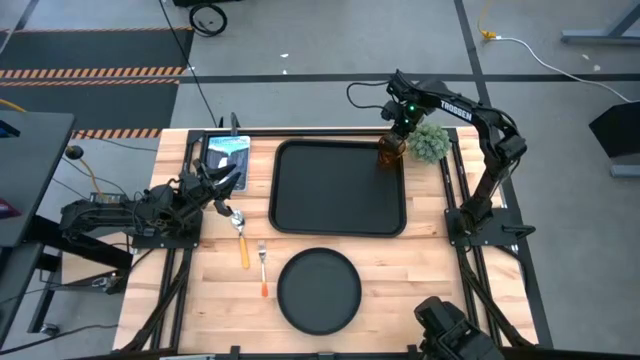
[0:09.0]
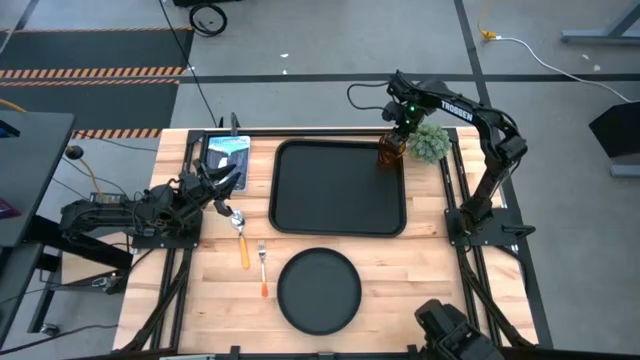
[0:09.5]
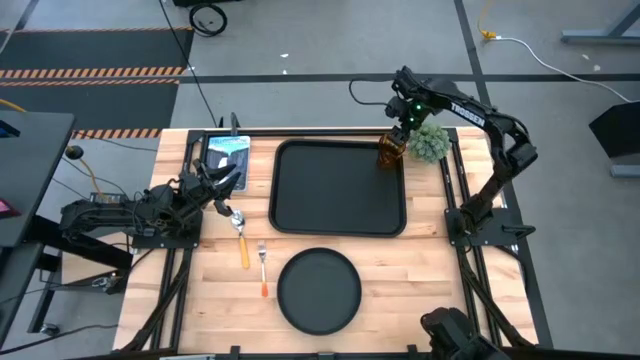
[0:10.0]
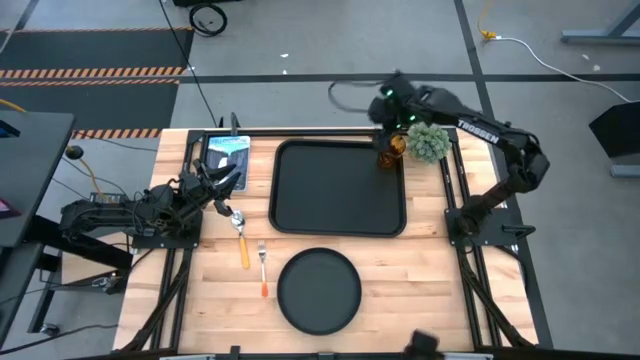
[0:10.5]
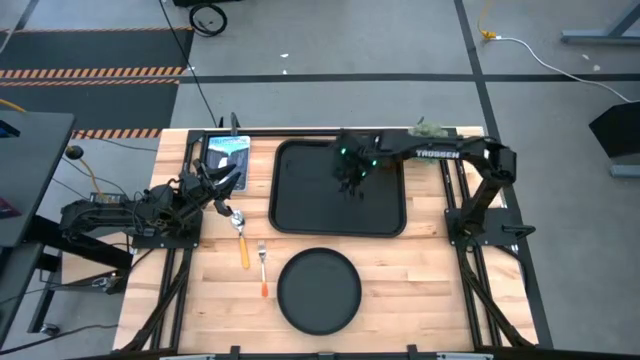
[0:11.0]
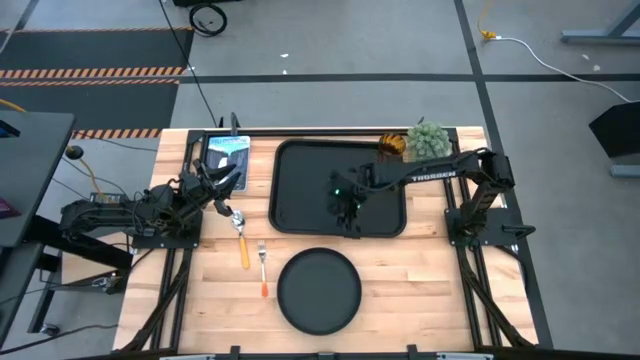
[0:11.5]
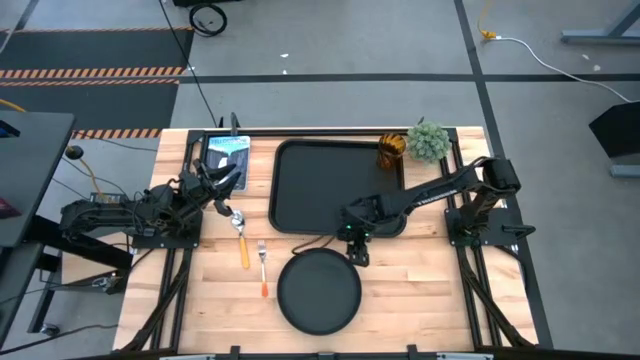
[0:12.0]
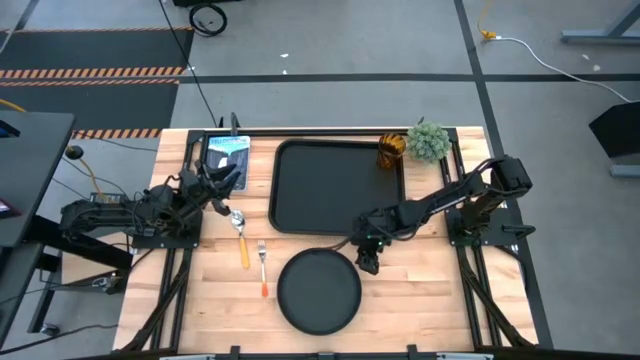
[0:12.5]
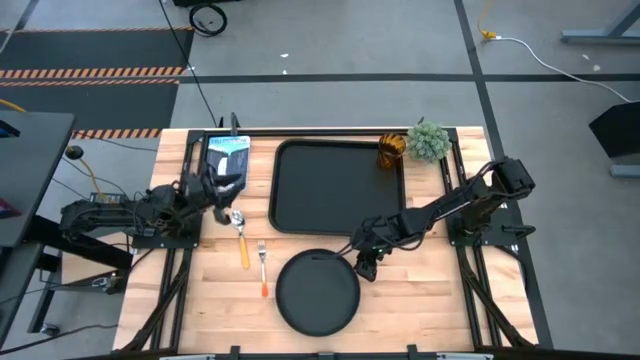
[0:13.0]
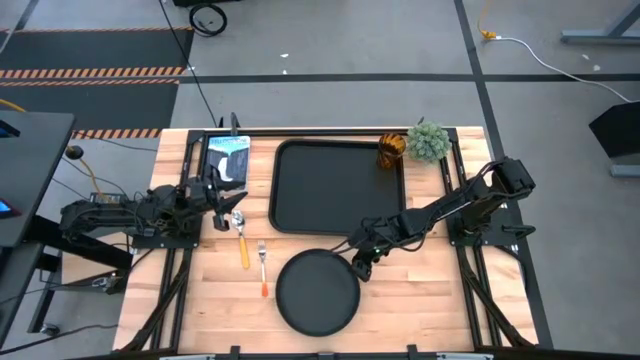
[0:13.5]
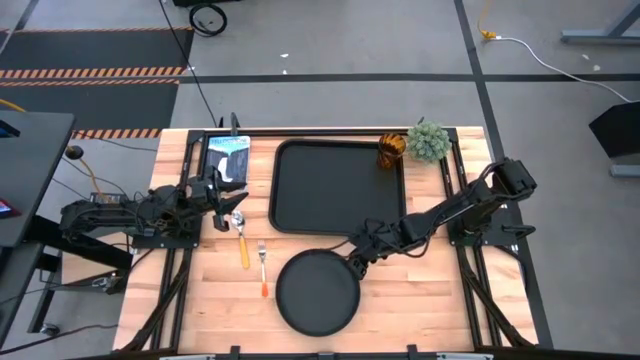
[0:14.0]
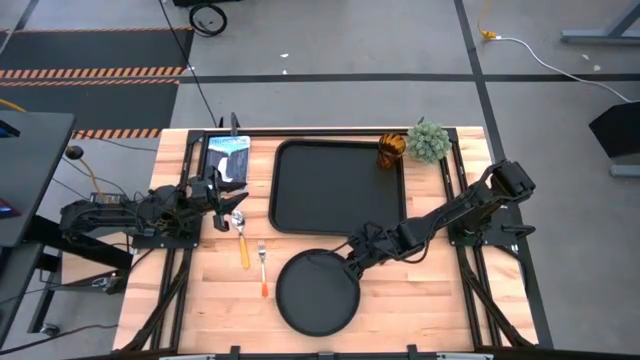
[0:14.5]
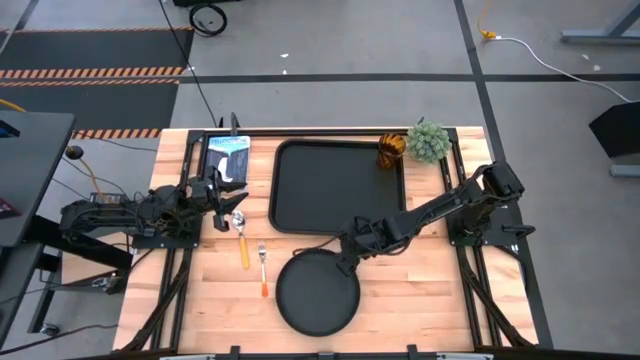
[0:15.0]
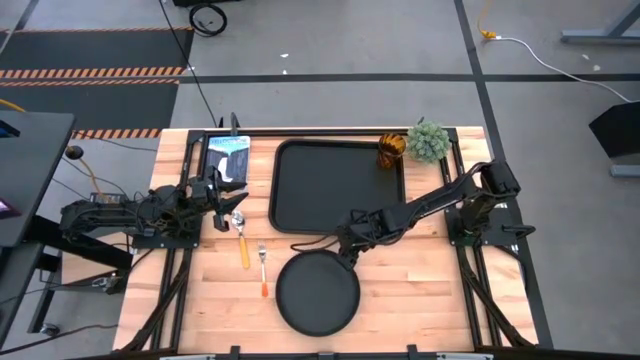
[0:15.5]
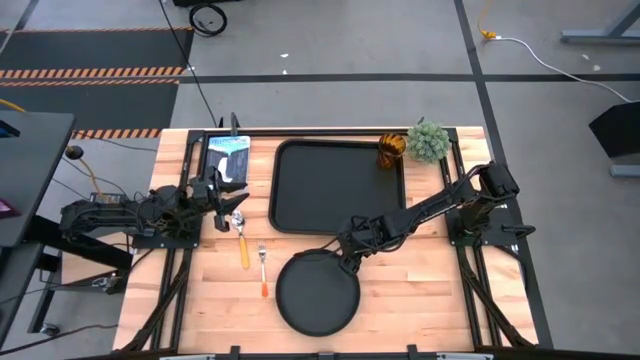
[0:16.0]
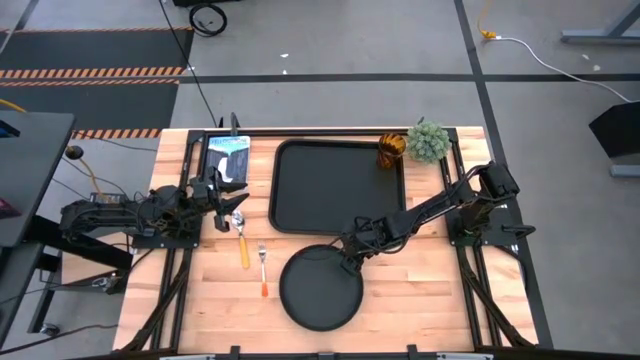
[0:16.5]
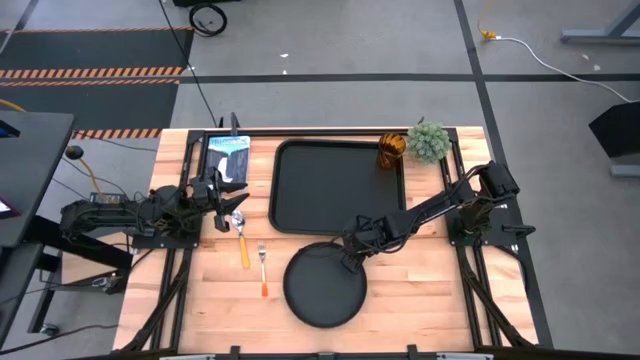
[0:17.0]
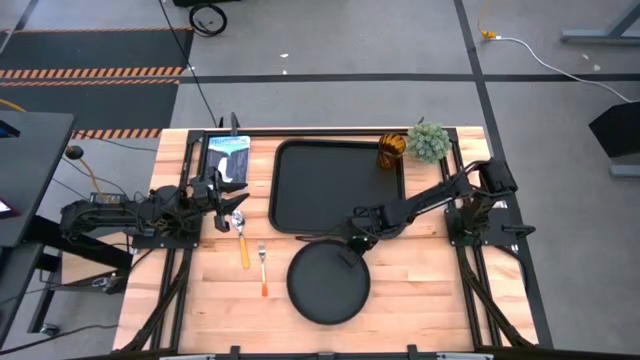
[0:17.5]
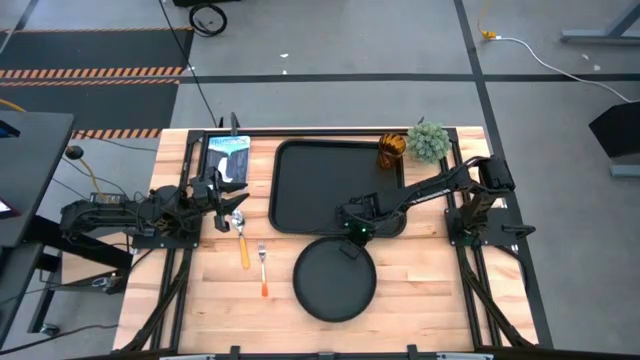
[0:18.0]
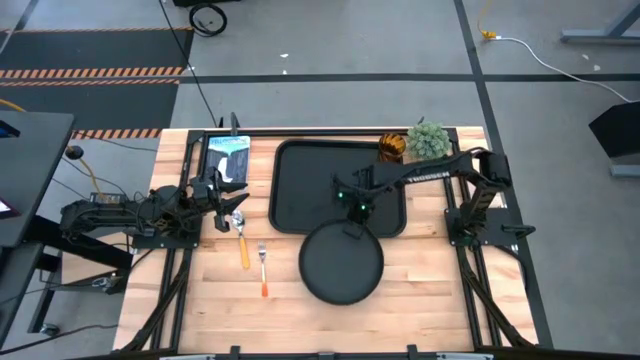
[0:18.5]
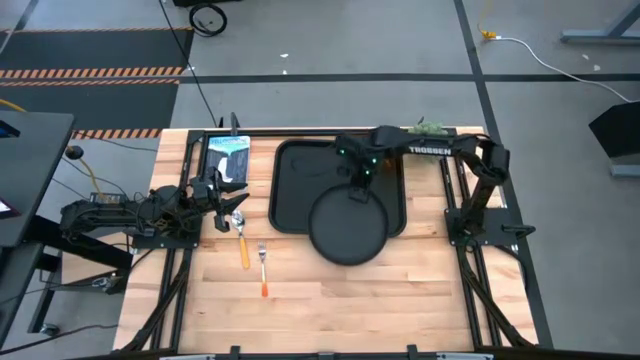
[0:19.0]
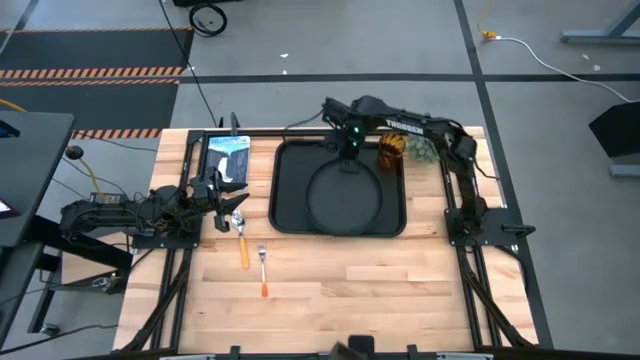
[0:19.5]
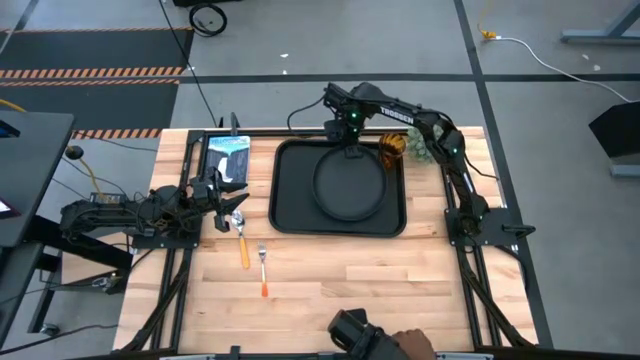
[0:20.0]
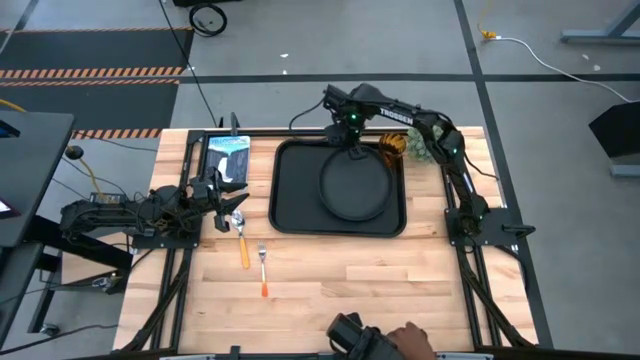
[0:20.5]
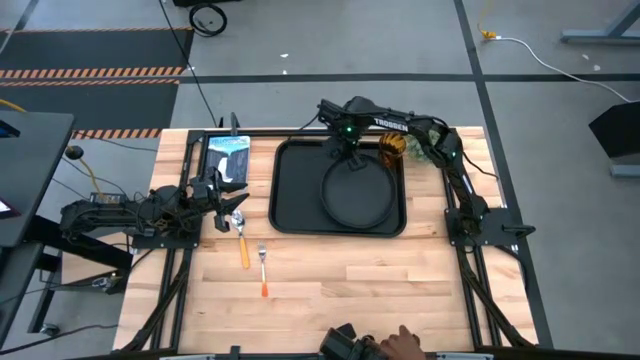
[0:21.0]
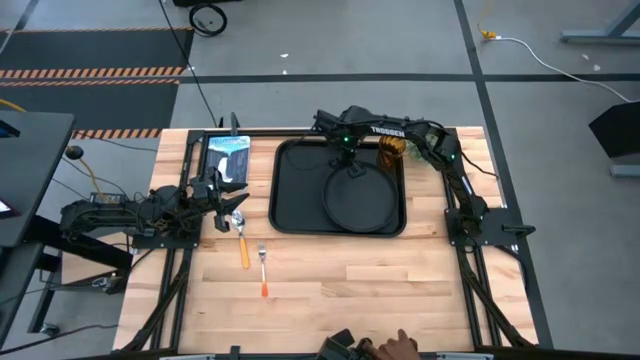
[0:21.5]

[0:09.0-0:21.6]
Task: Pick and place plate/cup/fork/spoon on tray
Put the plate on the tray to the bottom of the cup

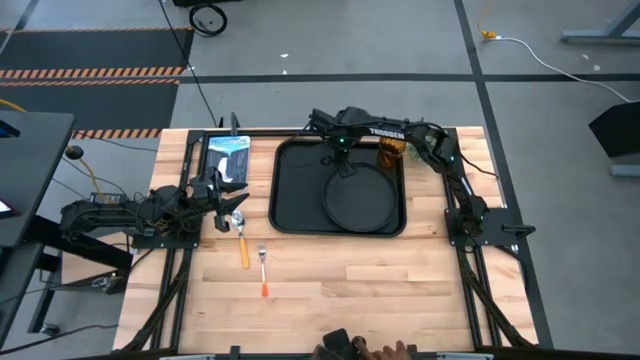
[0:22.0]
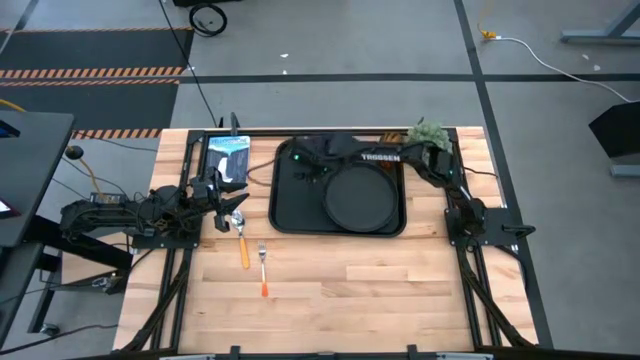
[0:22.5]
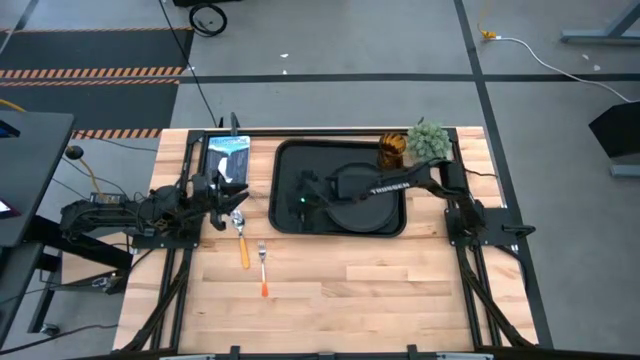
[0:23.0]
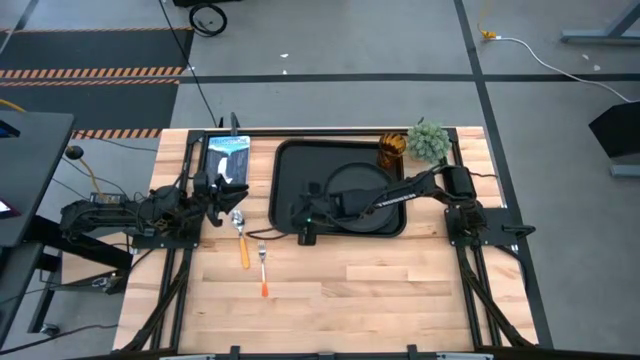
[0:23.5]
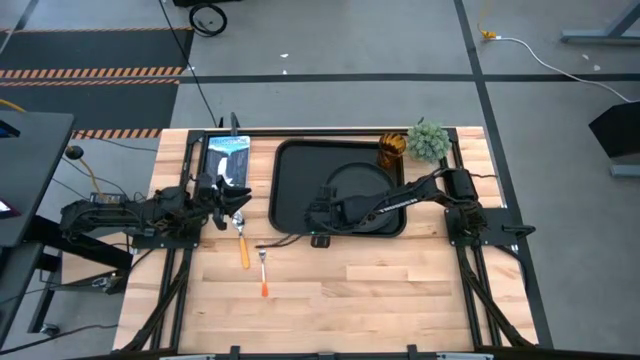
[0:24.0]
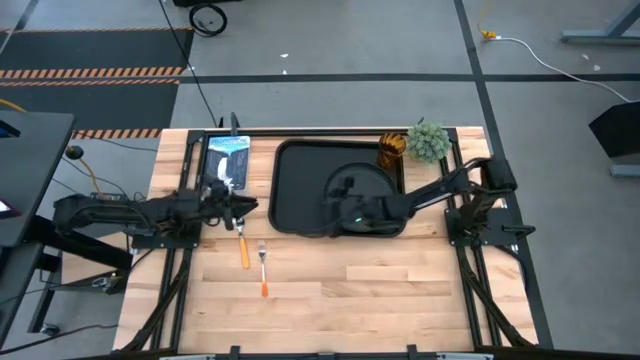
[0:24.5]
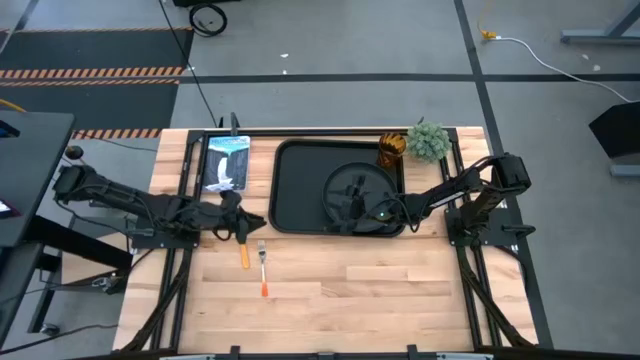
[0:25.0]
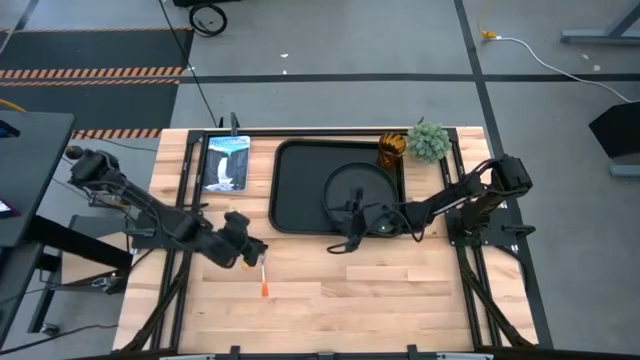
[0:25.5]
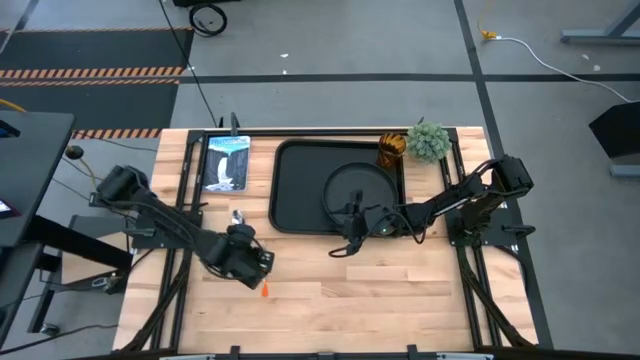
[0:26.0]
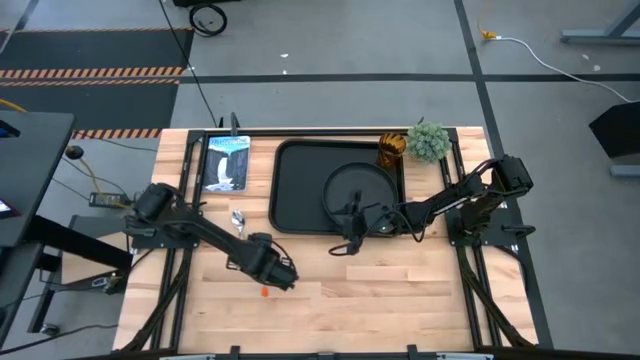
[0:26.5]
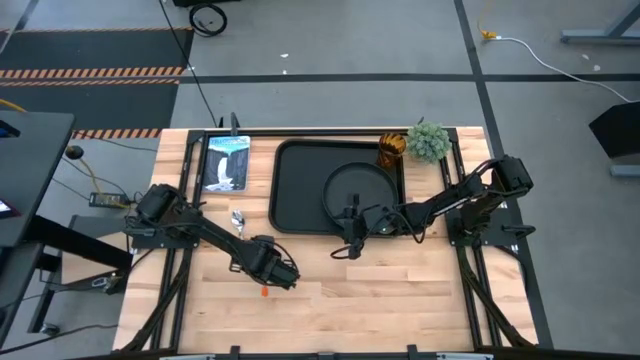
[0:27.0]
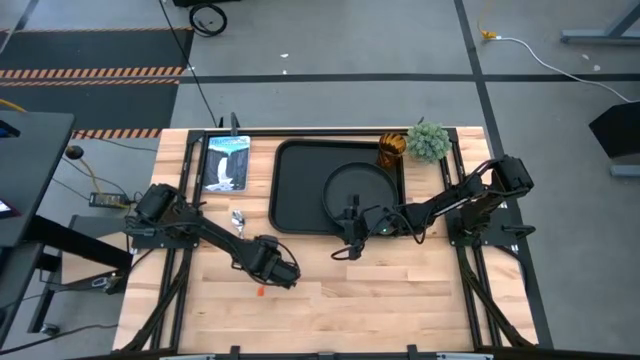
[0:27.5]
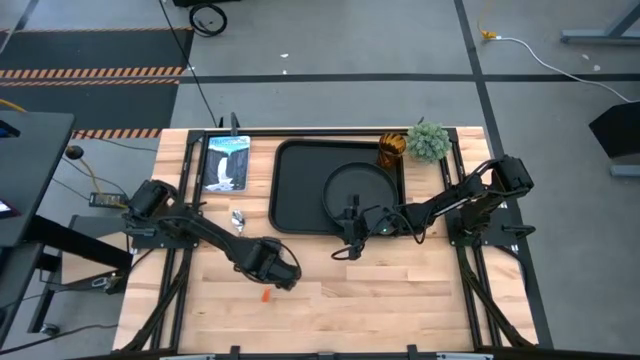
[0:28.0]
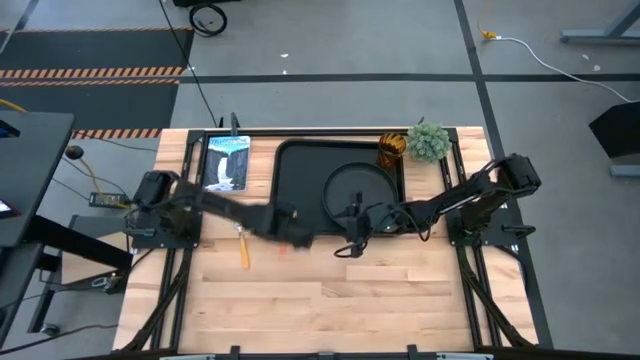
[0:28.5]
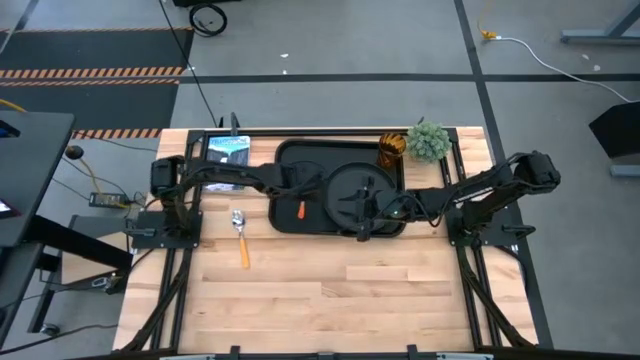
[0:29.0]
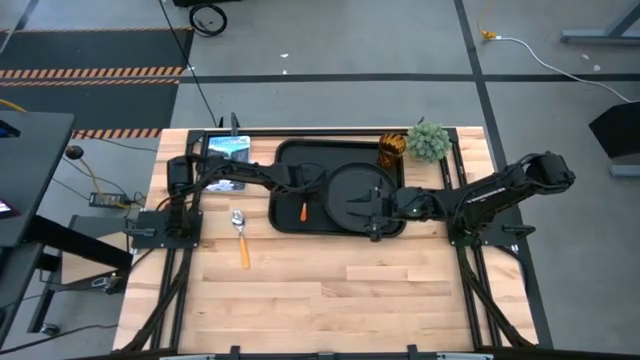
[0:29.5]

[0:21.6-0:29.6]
Put the fork on the tray to the left of the plate

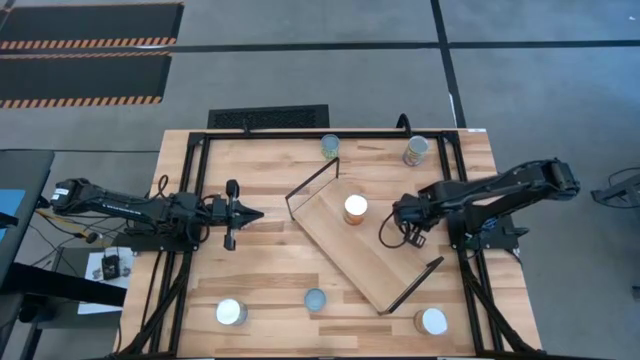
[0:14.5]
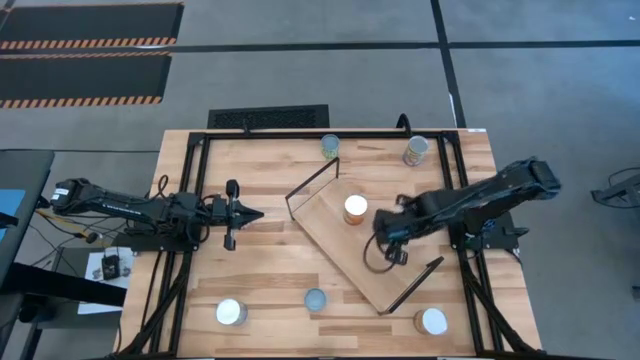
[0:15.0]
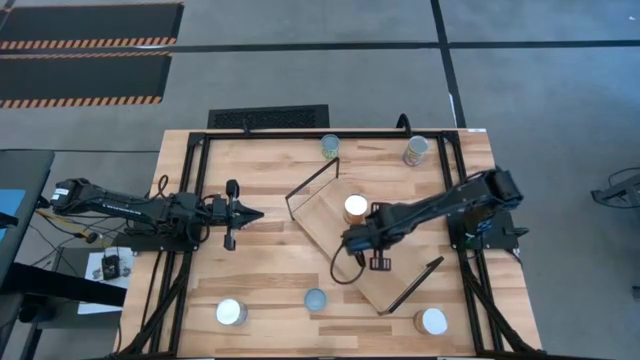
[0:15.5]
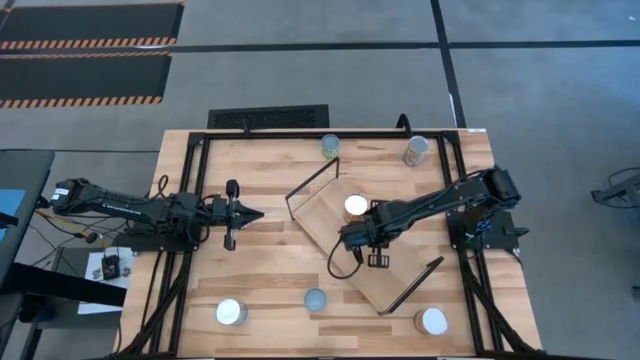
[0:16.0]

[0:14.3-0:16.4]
Task: Pick and place cans onto a shelf
Put the small canned corn on the shelf
